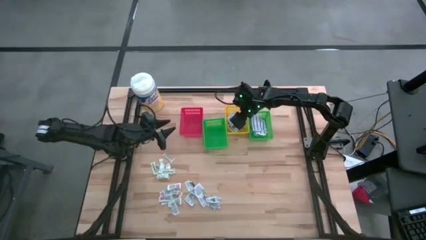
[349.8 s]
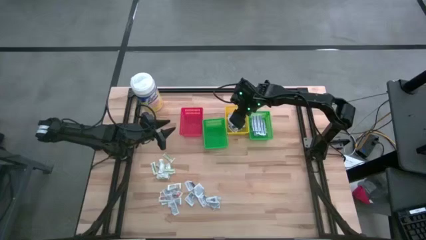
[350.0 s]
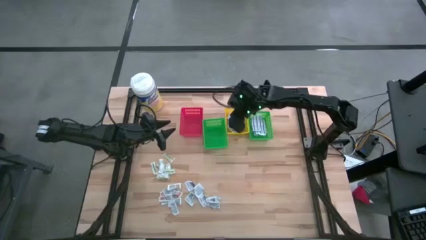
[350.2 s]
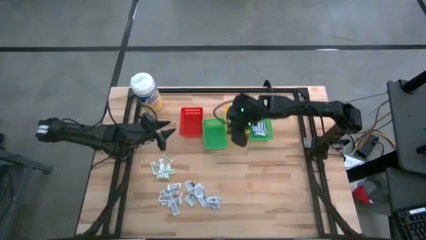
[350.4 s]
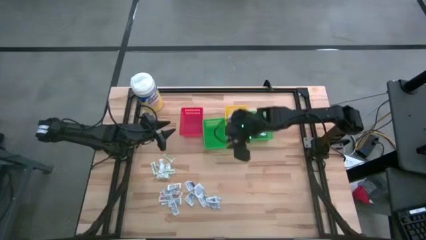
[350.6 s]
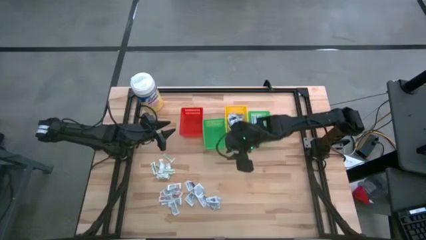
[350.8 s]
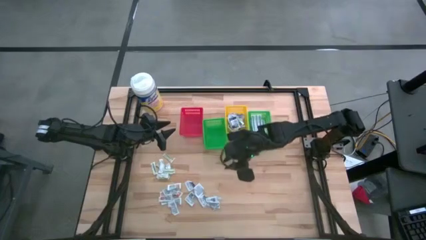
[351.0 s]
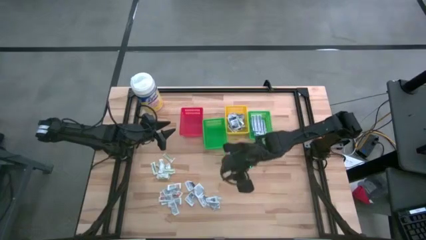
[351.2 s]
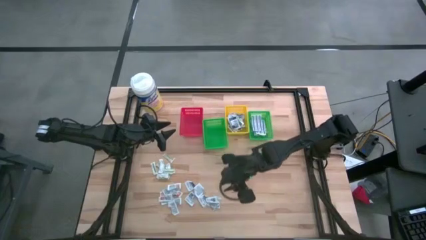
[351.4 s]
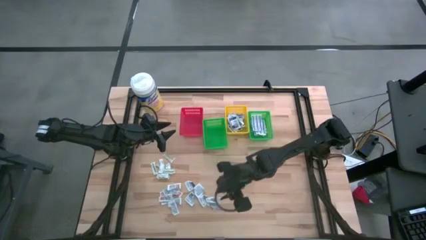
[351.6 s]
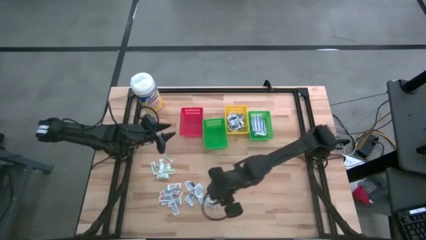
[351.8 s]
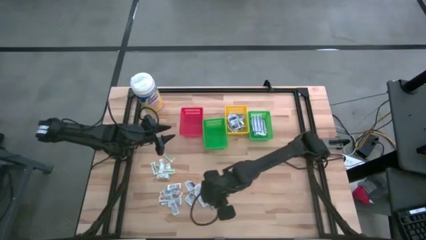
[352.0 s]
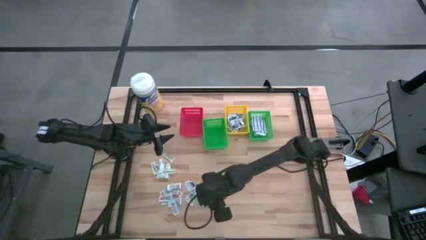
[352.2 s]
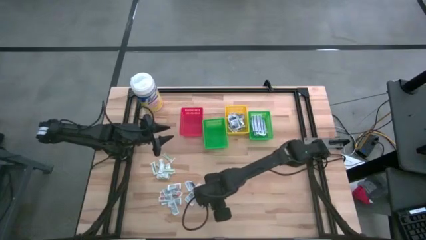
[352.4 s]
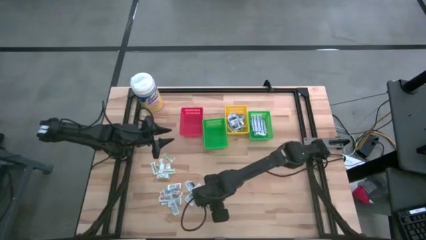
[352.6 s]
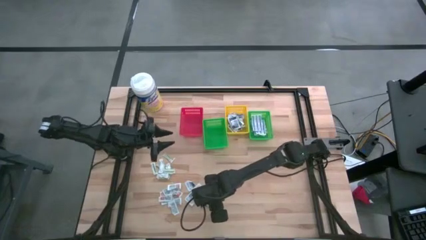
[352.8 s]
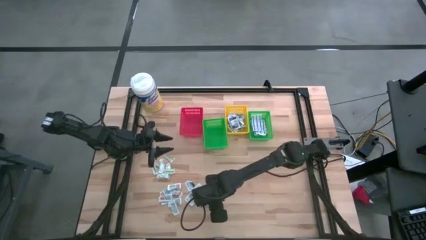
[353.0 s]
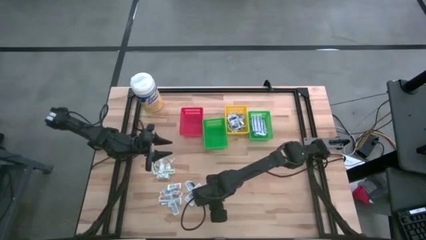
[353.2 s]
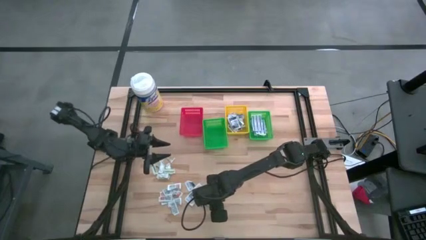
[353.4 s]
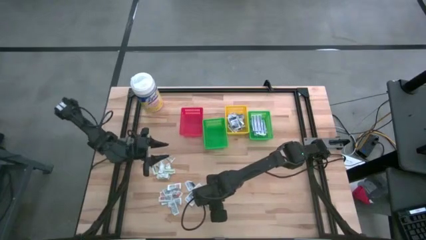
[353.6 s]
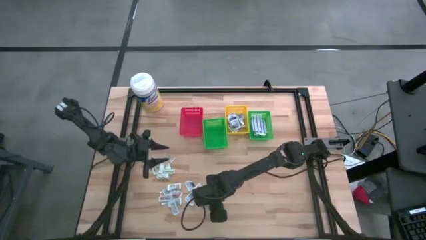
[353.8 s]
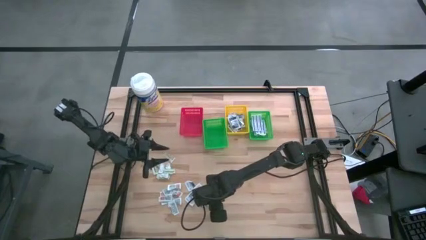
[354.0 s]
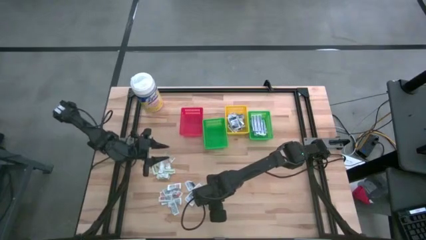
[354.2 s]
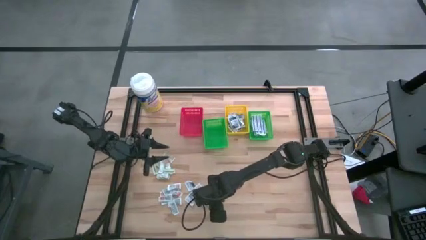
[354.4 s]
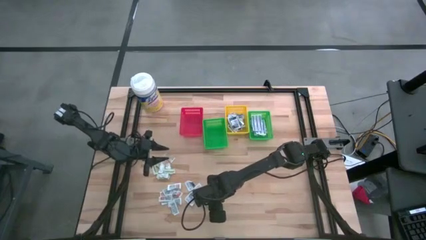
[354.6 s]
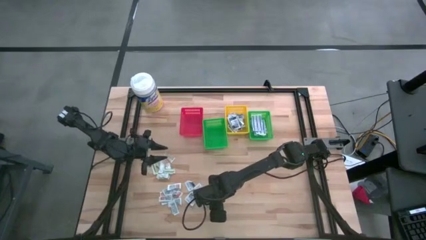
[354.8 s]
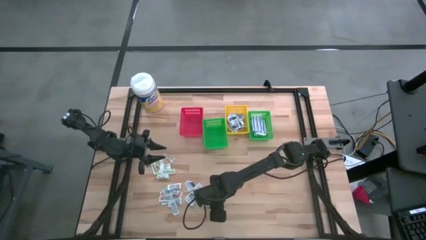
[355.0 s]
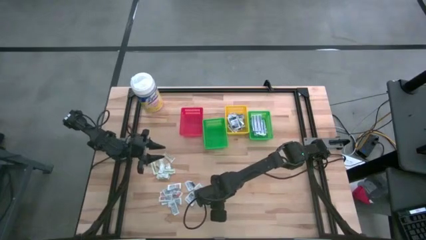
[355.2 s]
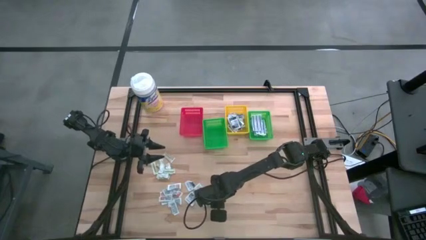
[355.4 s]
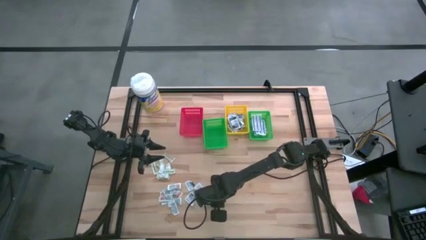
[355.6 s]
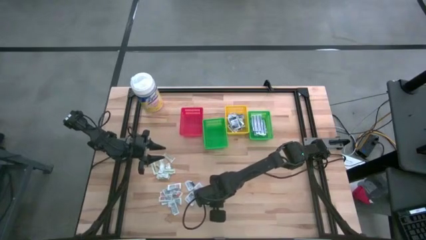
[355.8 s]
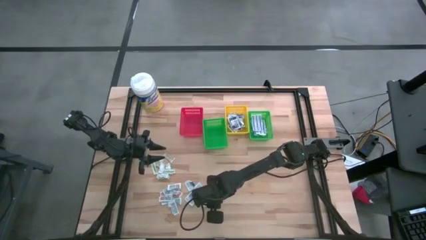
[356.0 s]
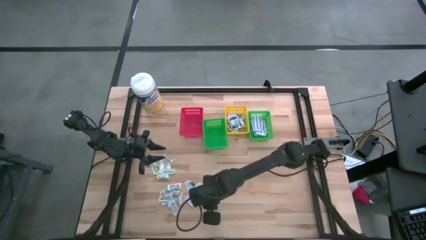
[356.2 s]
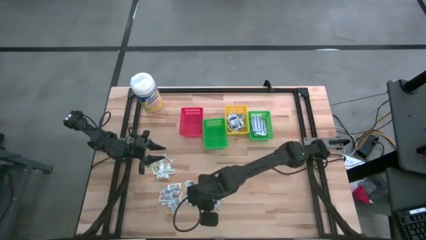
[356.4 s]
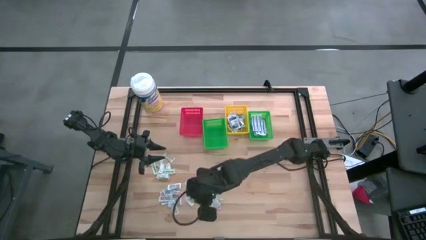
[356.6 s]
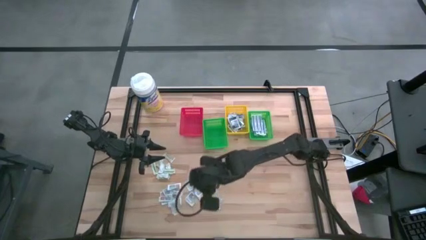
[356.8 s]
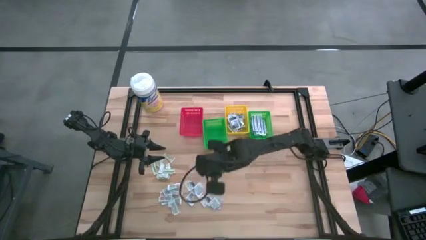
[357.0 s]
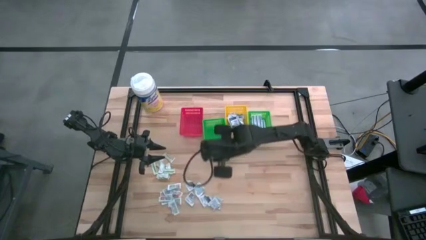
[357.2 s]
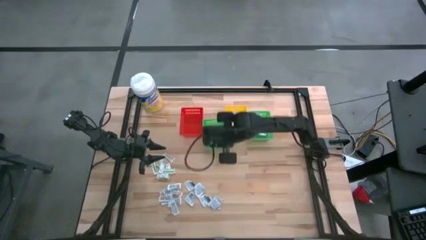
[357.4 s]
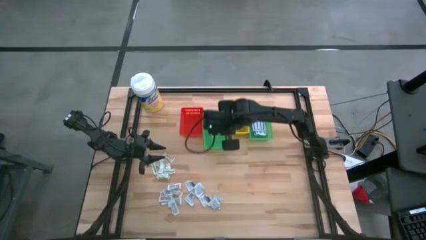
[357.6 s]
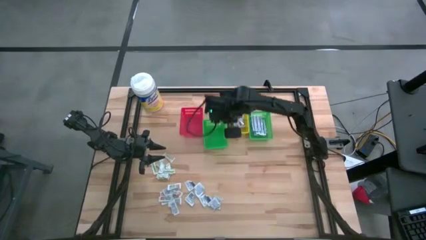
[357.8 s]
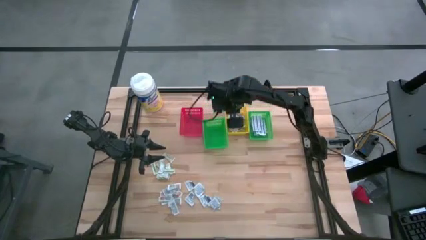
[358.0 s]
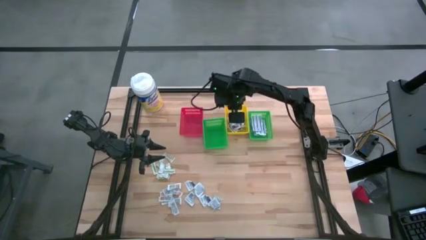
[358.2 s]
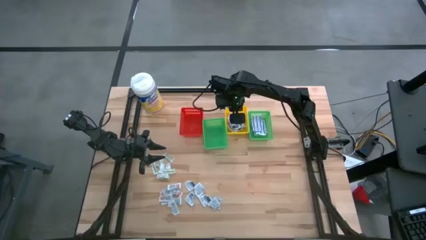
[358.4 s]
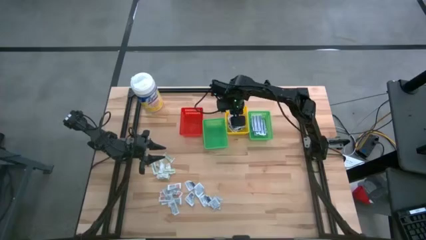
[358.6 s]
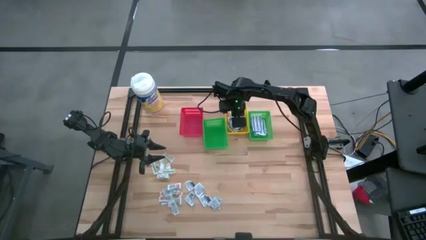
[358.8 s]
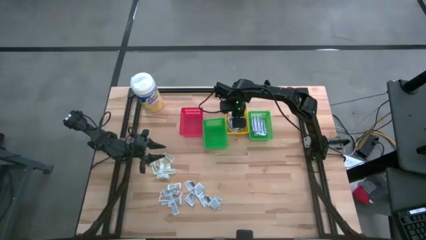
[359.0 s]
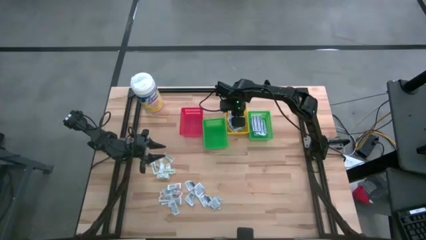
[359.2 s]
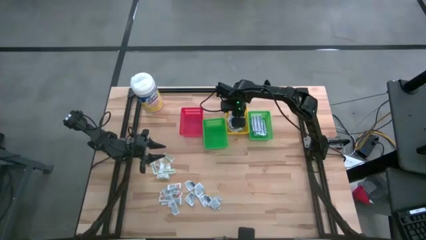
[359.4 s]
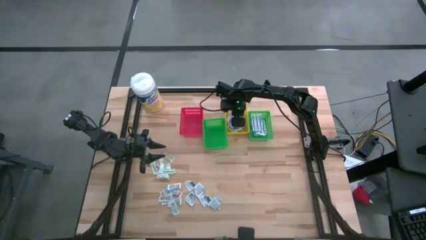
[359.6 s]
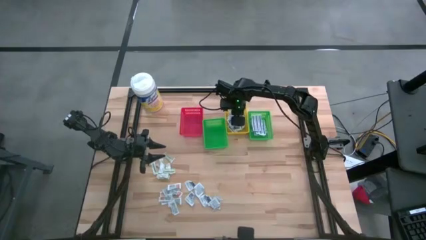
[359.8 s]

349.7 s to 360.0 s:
Task: Pick & Place First Aid Supplies
Put the alcohol pad into the yellow basket

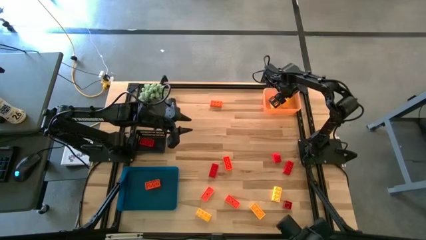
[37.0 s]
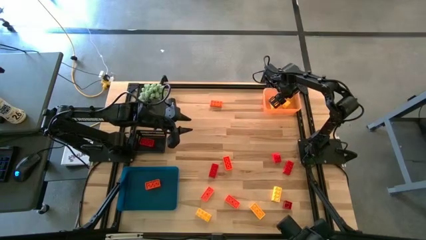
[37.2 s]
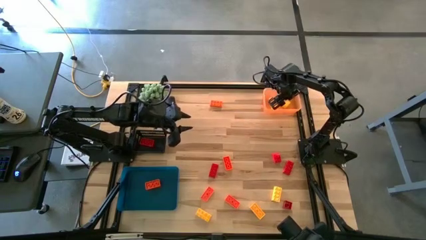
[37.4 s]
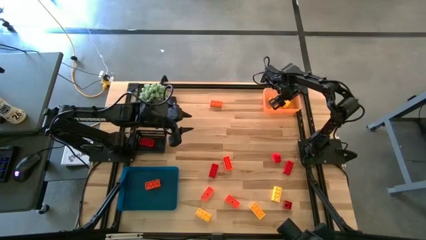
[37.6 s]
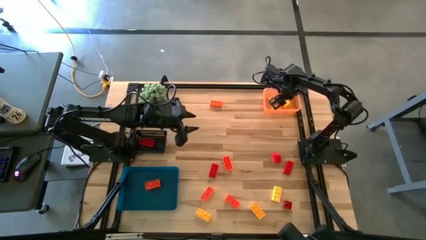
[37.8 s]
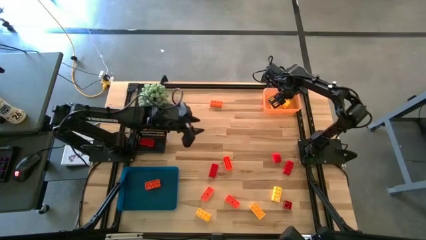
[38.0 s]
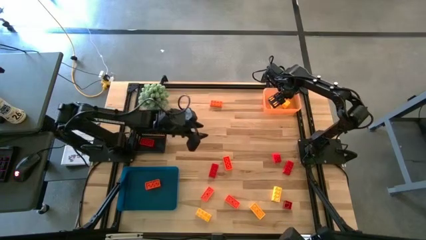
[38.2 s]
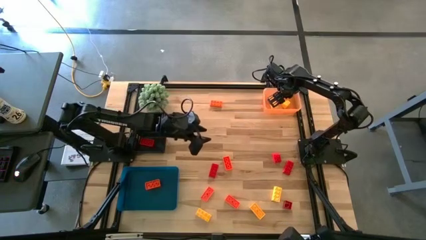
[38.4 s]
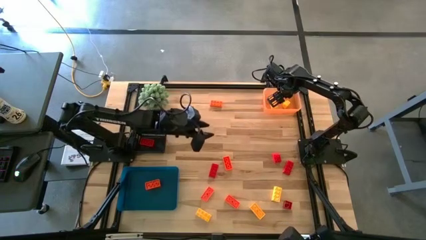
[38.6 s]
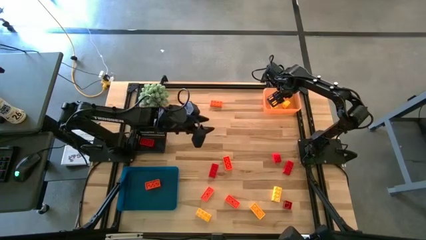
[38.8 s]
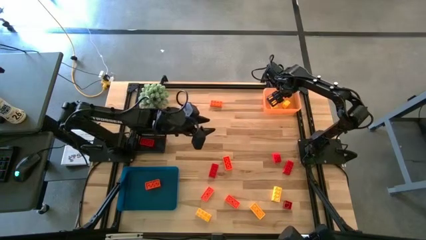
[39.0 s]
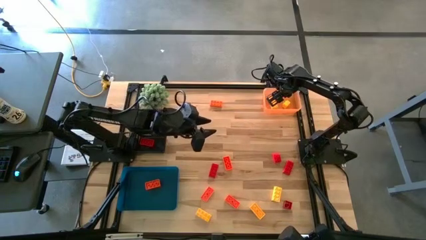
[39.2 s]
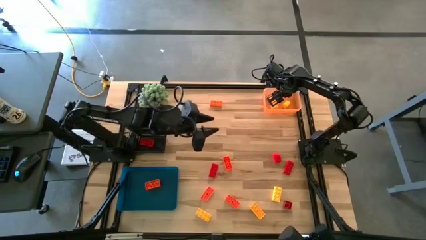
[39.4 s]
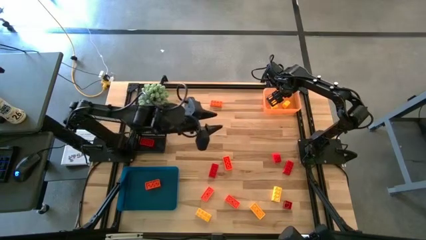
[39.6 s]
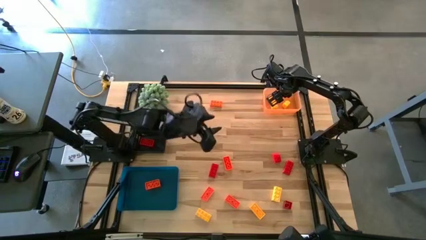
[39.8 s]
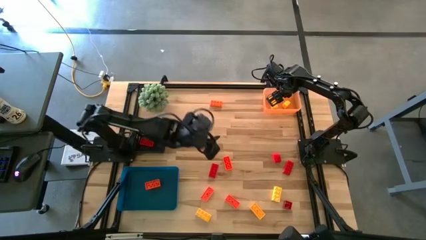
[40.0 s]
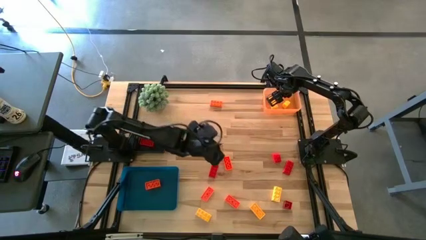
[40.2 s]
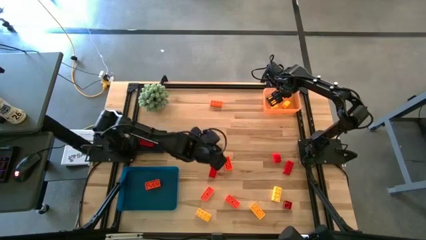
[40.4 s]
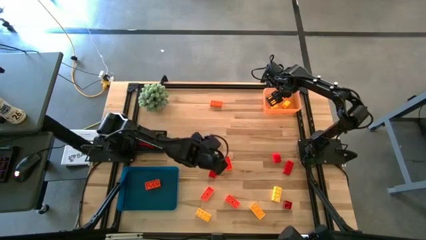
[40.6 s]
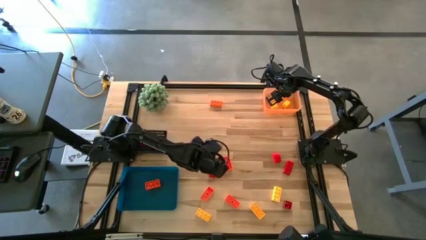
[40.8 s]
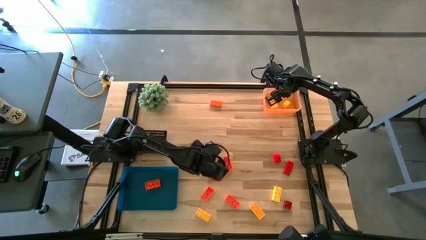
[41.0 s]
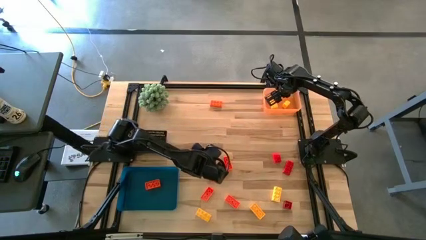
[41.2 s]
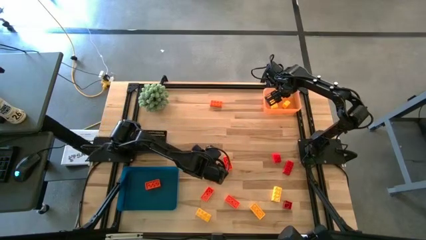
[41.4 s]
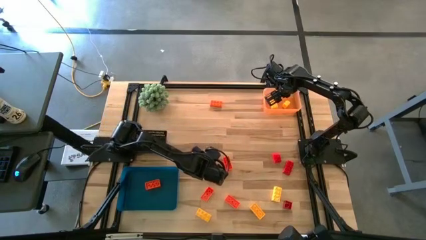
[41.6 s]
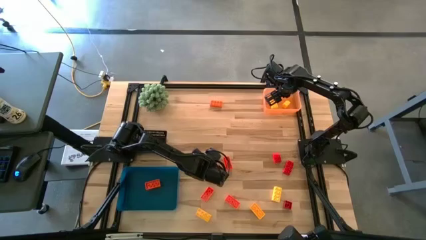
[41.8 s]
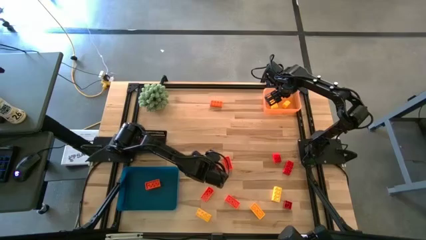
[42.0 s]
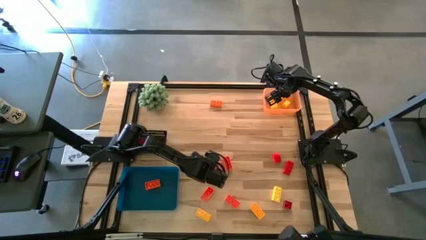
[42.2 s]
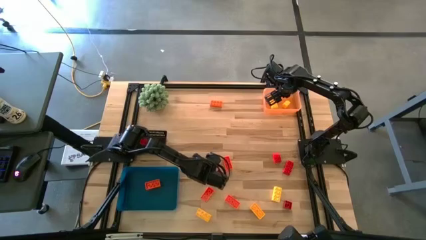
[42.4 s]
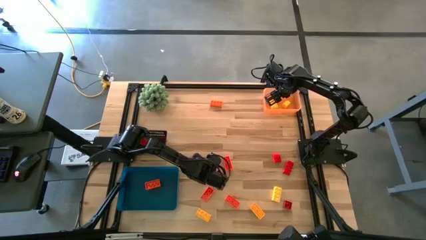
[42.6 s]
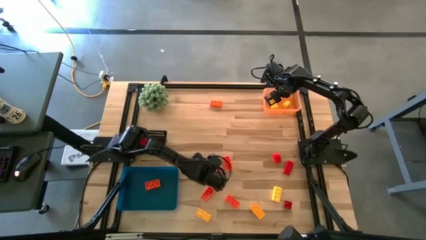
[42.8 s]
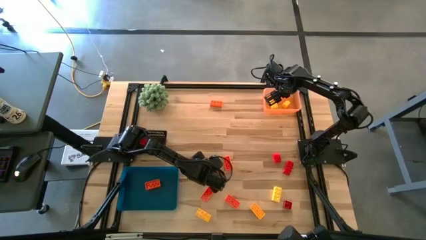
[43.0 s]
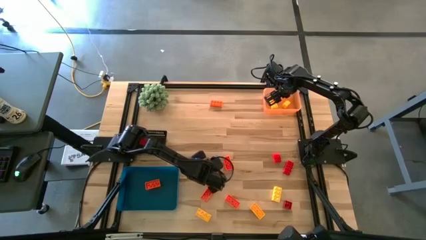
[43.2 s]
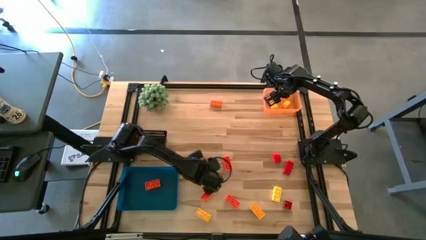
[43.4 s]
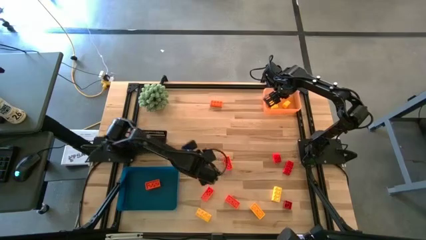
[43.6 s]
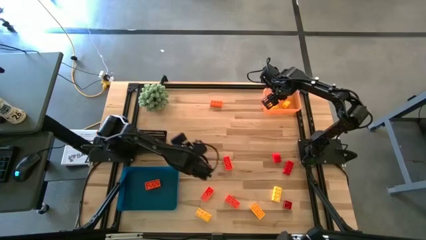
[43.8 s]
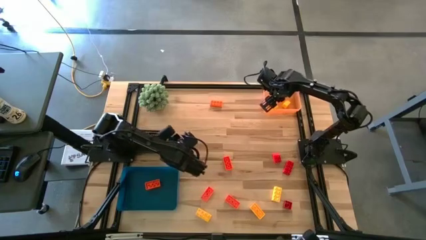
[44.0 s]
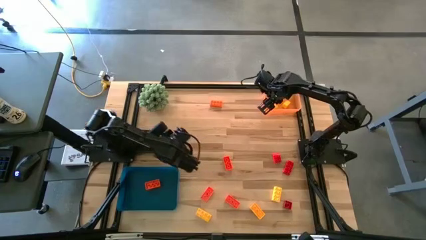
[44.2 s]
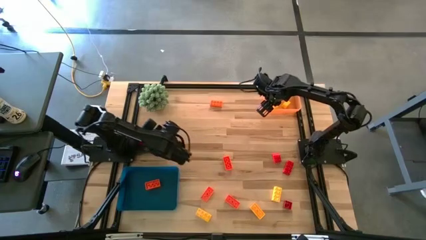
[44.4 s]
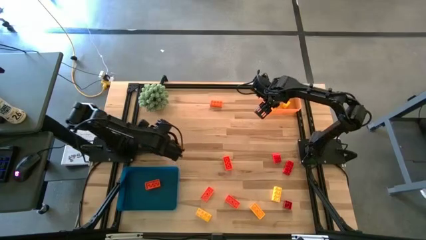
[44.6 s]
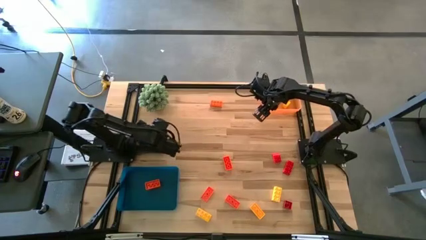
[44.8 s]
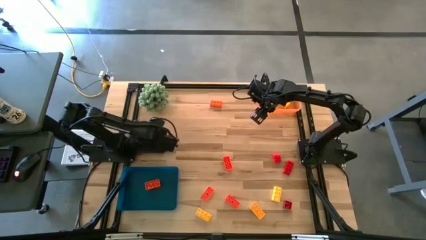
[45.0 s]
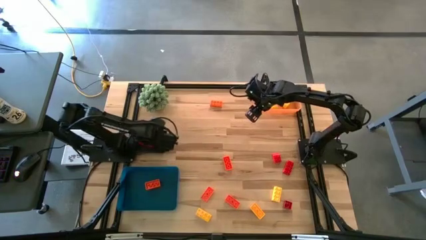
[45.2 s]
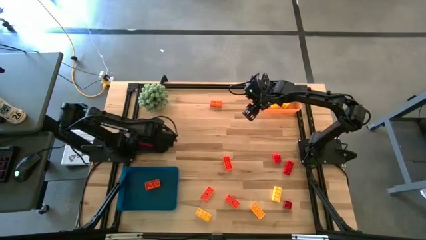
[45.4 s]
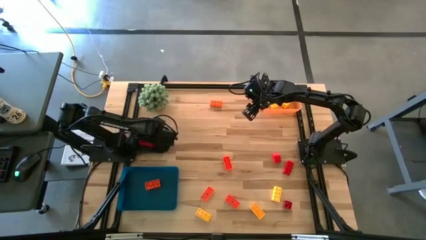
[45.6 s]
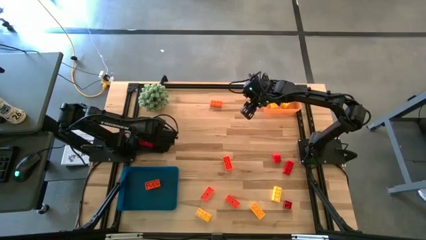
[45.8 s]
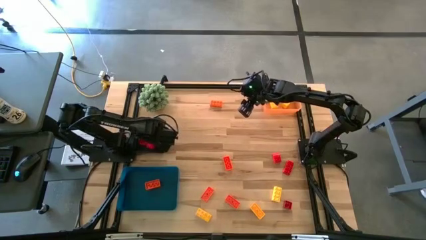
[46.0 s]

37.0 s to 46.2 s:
Task: Sort & place blocks by color
Put the red game piece into the black bin
